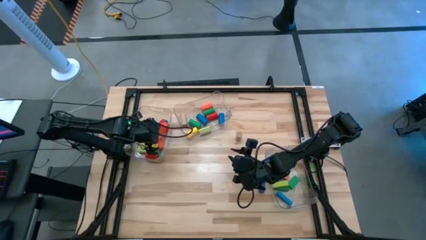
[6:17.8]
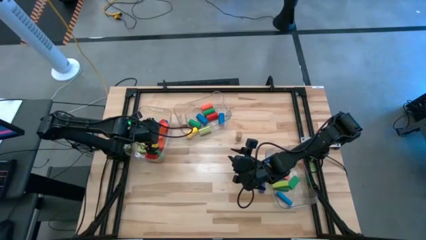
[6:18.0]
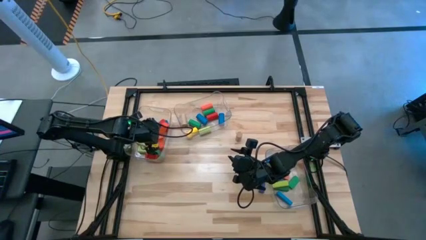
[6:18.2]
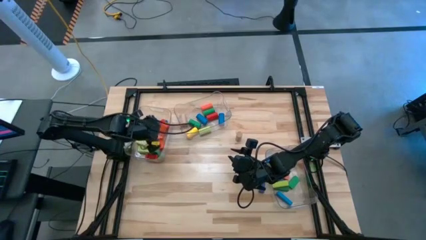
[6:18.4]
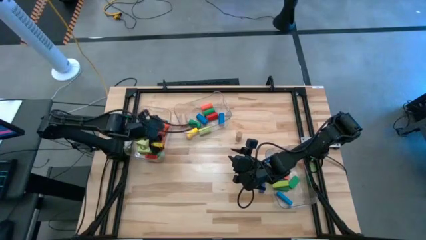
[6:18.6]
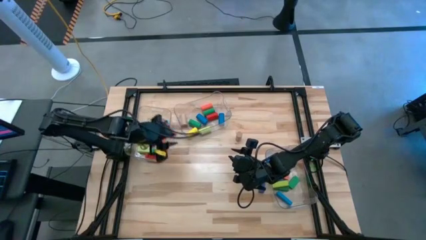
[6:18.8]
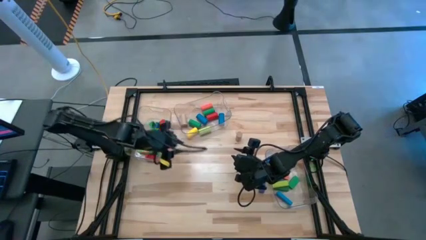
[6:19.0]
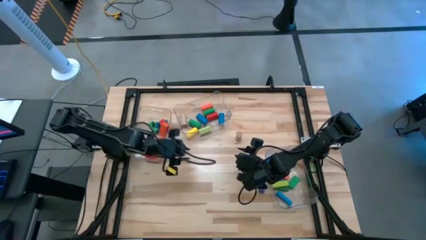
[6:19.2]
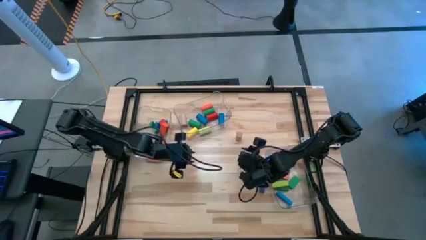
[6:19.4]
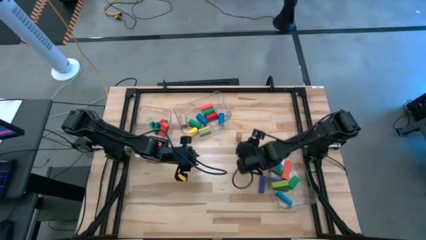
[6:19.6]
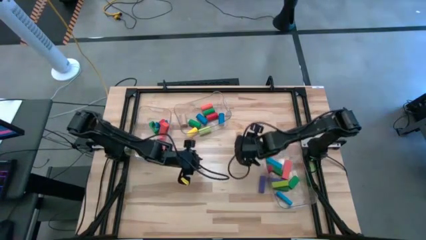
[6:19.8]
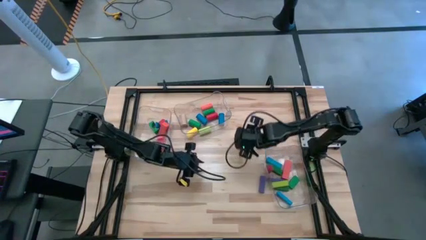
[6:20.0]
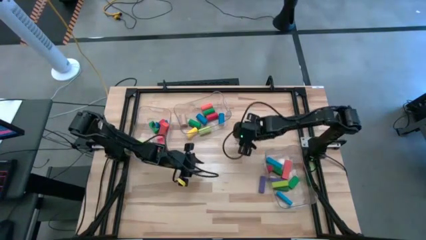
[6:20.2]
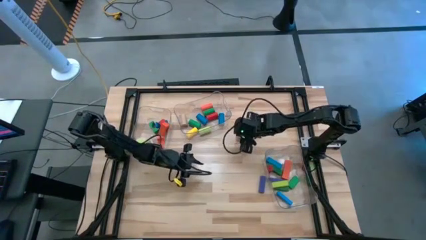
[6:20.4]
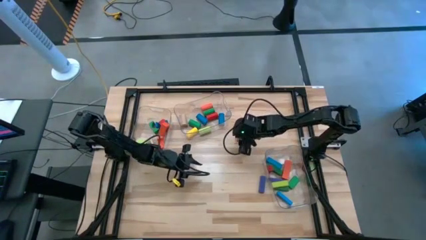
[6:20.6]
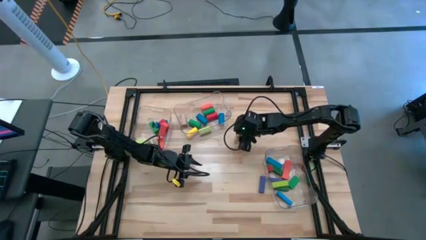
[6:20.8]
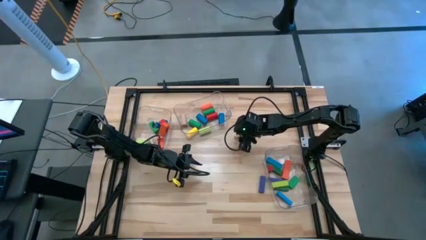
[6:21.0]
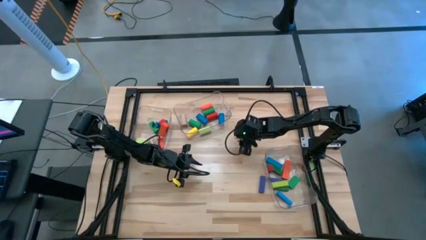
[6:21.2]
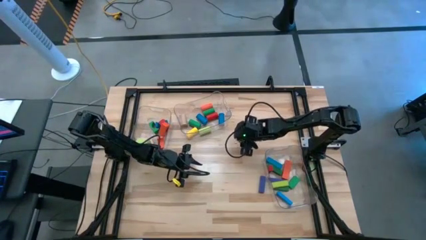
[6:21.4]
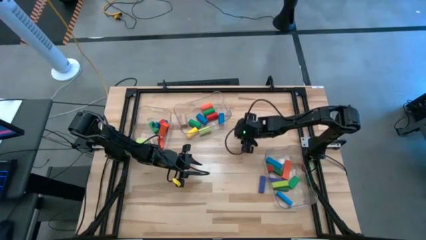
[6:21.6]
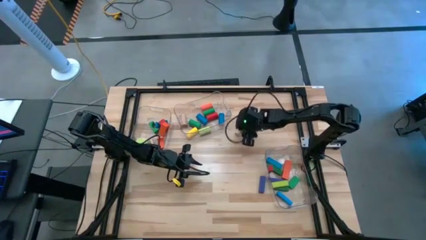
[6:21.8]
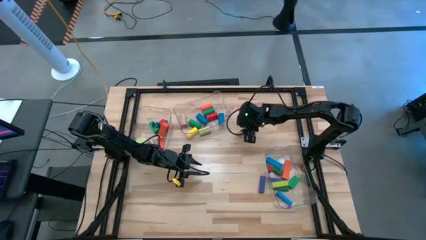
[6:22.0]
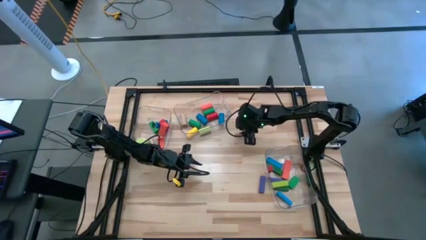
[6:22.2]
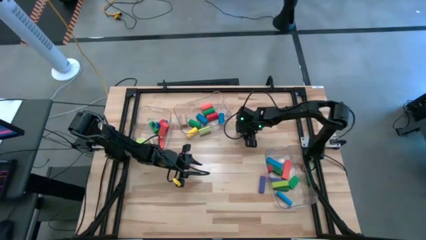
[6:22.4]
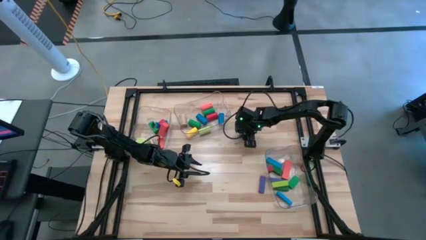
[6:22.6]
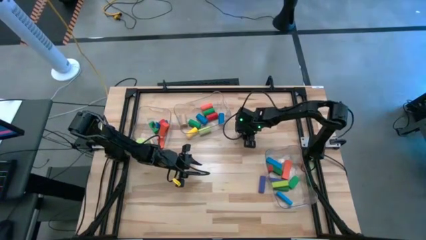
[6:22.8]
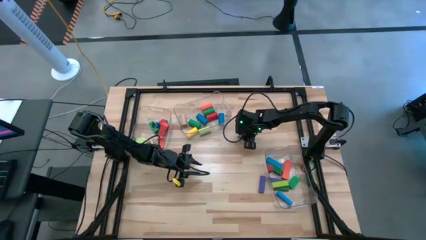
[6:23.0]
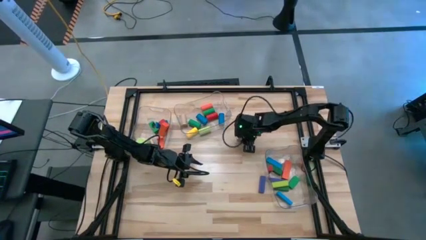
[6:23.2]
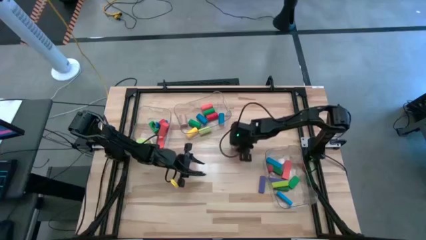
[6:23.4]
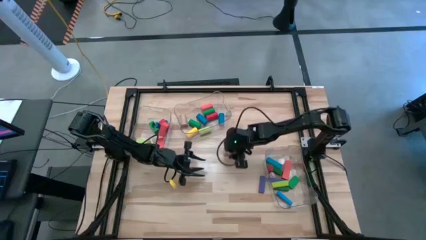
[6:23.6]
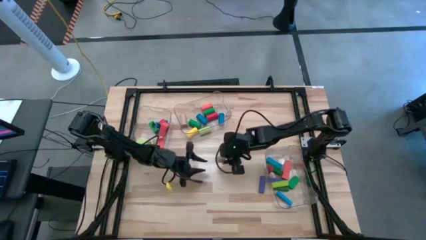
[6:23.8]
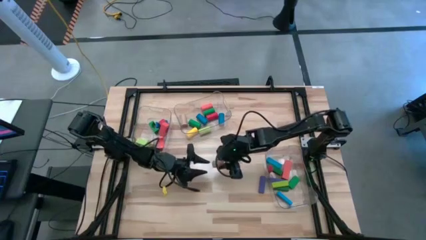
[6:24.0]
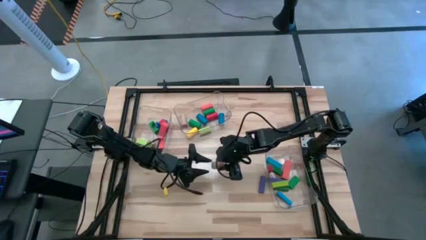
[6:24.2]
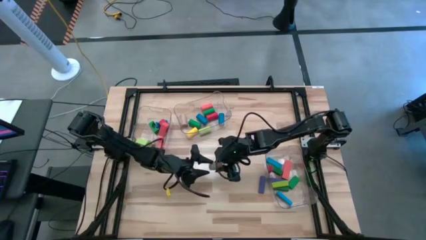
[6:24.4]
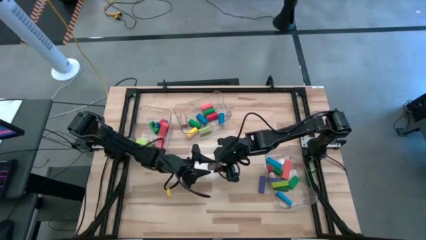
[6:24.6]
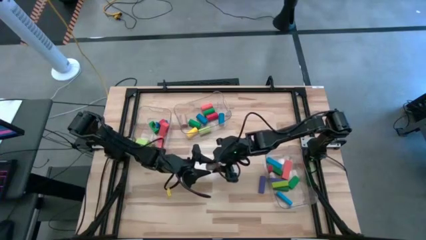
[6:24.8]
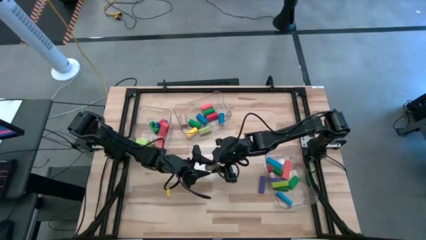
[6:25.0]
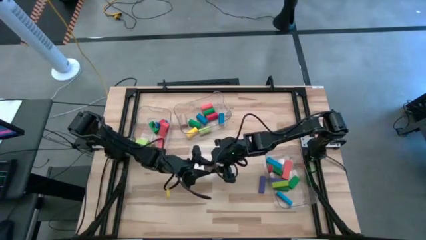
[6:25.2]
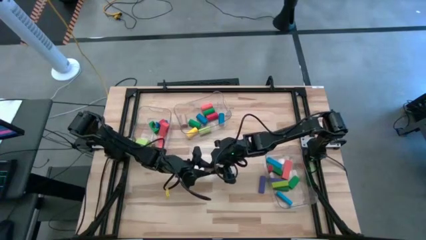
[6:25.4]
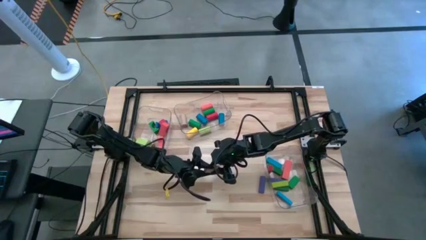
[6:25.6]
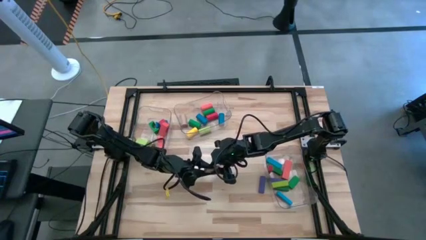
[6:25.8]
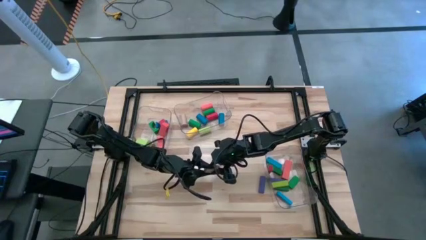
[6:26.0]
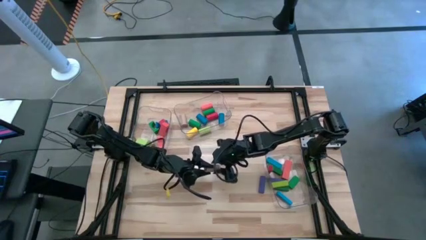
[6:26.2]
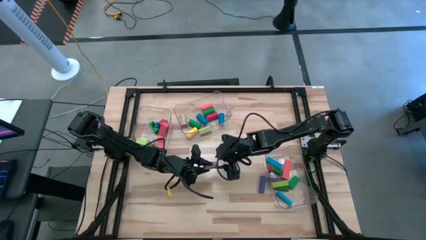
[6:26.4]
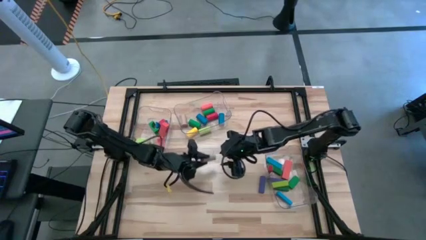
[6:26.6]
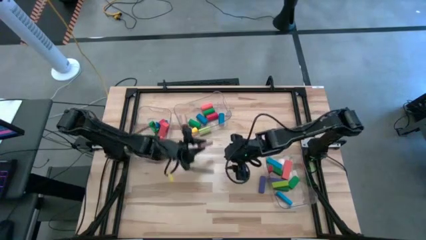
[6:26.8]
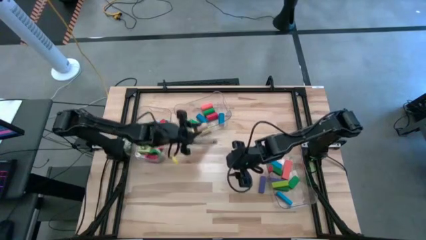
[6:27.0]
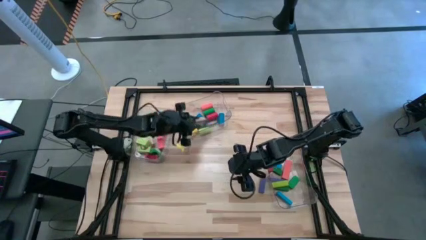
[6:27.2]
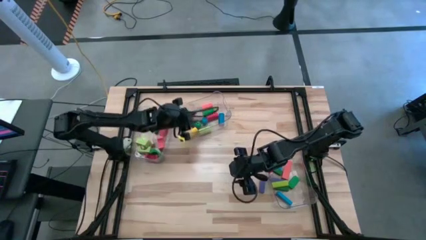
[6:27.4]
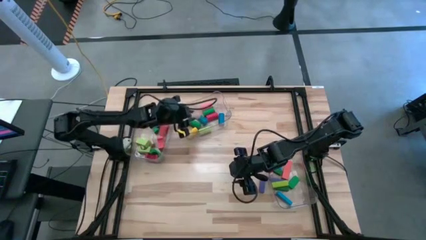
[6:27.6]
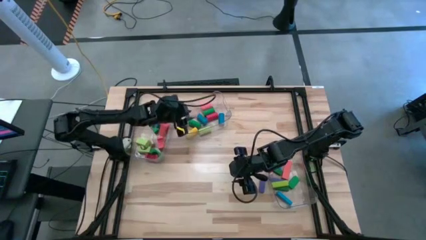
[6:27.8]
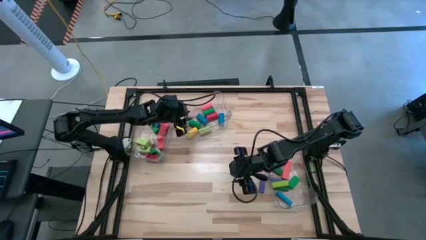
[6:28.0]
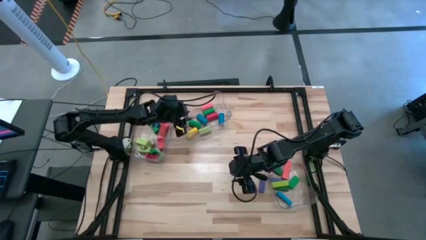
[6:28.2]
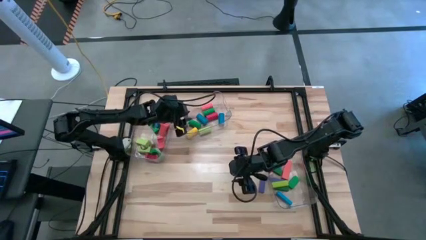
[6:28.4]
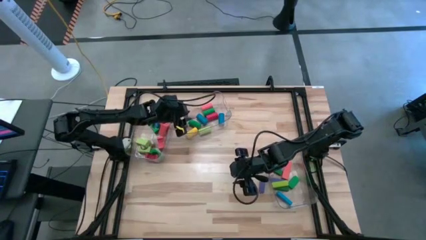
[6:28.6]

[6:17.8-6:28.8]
Task: Sort blocks by size
Put the brown cylindrical block into the top transparent bin

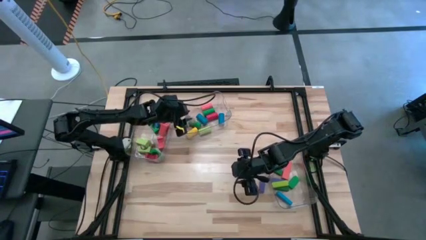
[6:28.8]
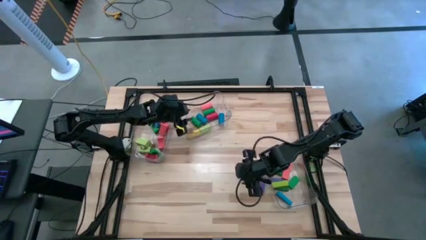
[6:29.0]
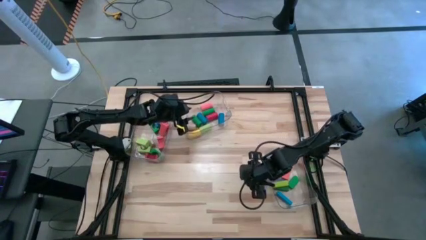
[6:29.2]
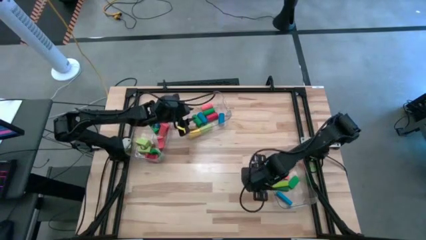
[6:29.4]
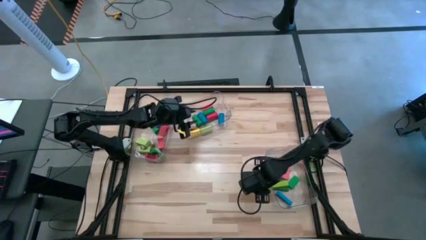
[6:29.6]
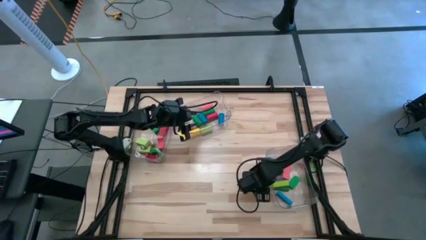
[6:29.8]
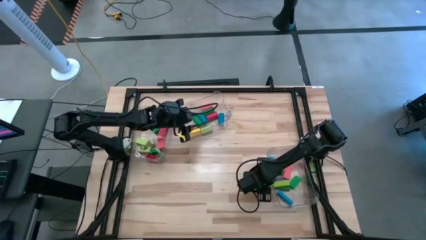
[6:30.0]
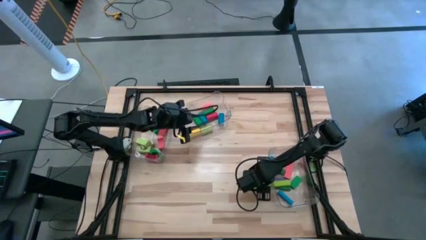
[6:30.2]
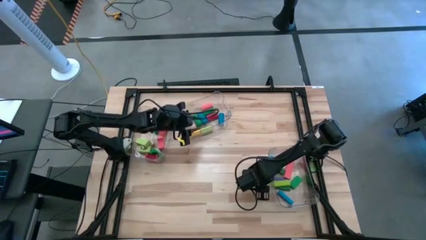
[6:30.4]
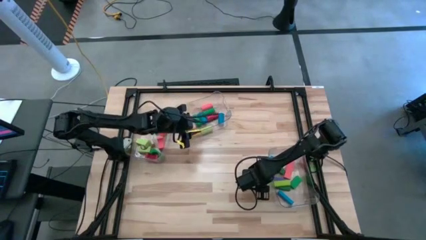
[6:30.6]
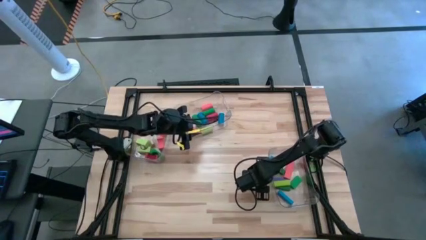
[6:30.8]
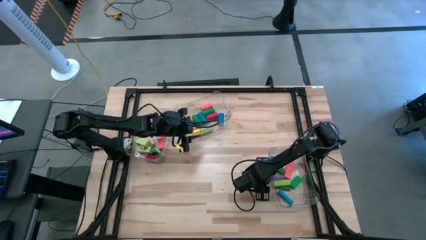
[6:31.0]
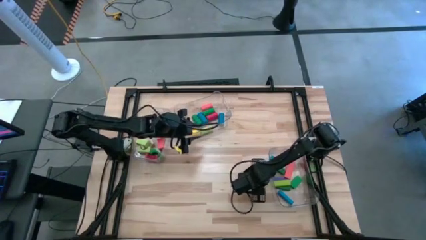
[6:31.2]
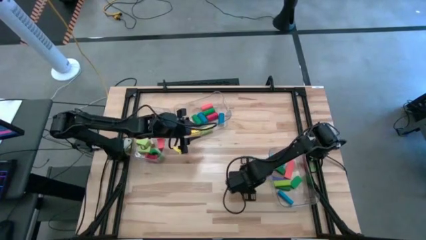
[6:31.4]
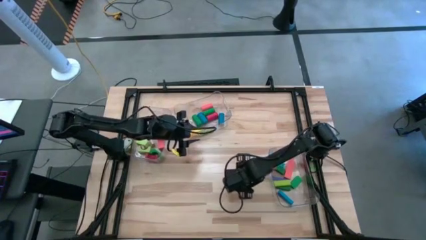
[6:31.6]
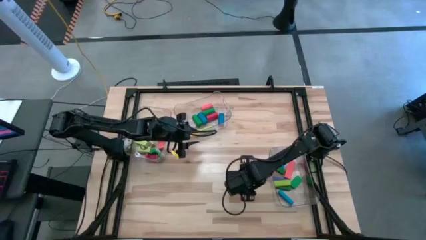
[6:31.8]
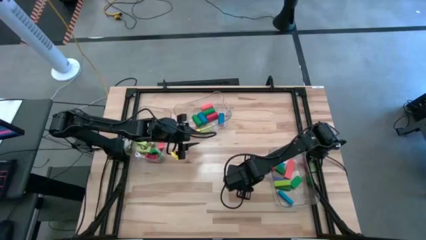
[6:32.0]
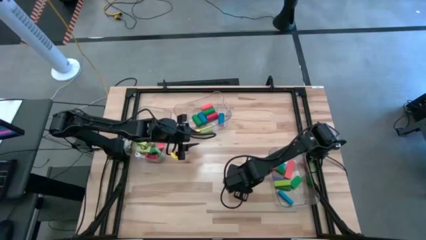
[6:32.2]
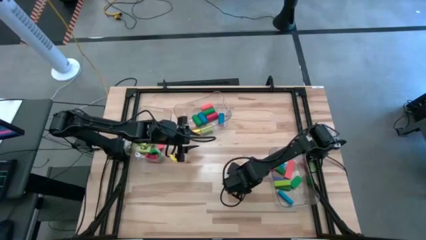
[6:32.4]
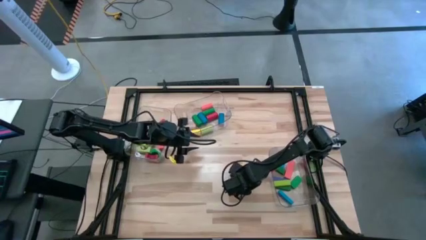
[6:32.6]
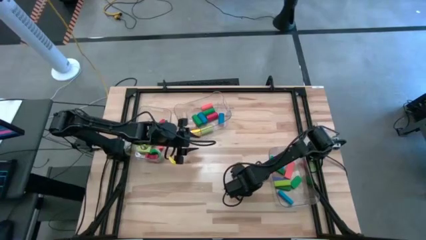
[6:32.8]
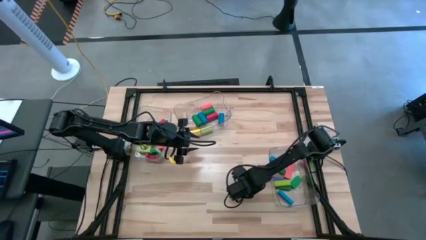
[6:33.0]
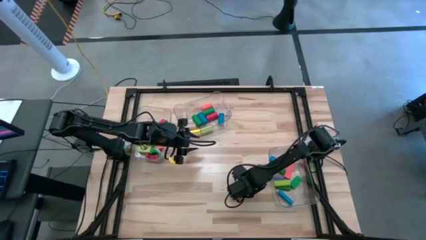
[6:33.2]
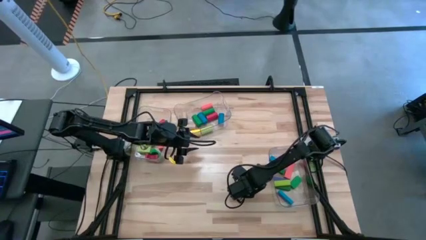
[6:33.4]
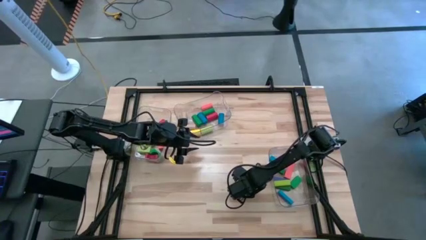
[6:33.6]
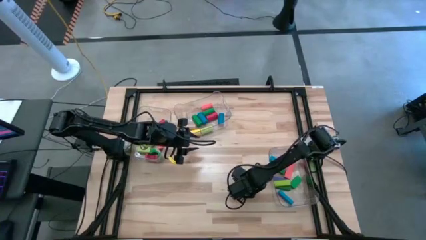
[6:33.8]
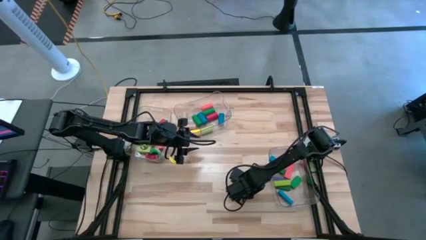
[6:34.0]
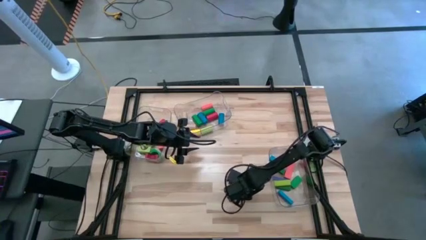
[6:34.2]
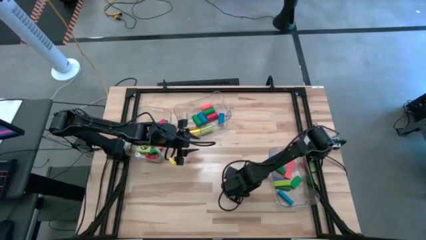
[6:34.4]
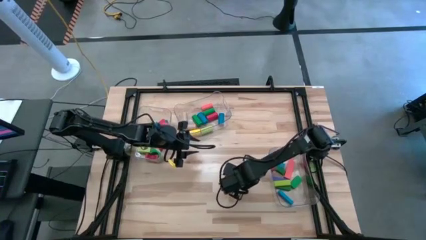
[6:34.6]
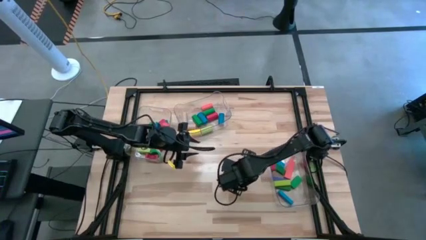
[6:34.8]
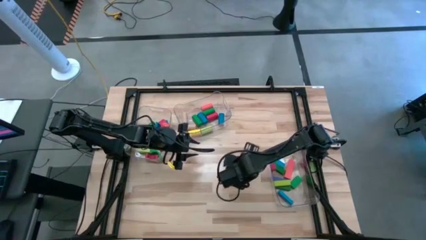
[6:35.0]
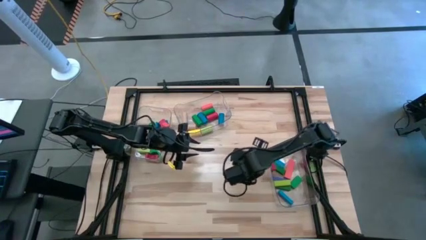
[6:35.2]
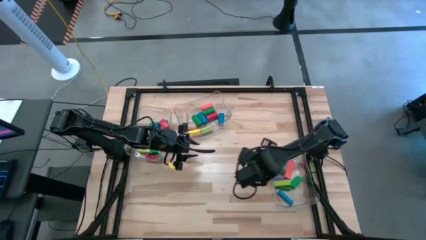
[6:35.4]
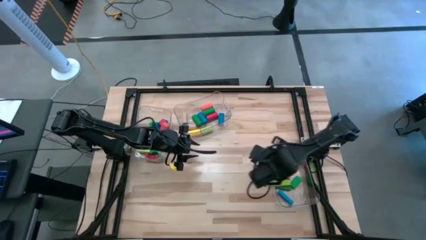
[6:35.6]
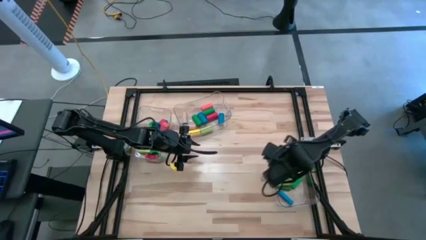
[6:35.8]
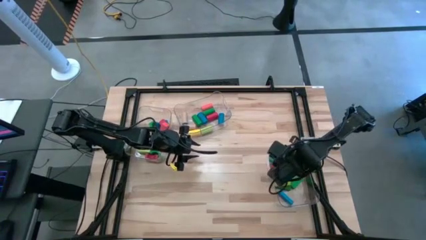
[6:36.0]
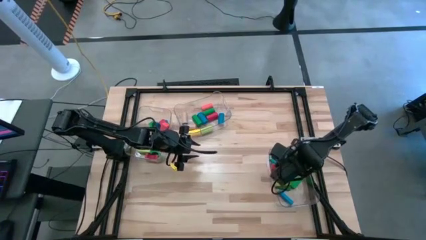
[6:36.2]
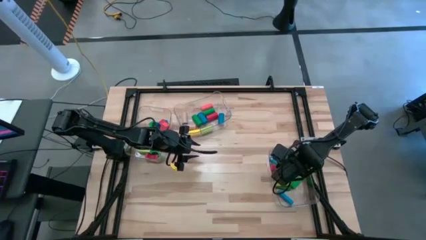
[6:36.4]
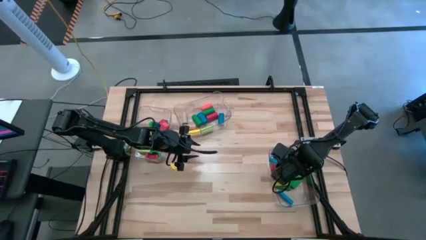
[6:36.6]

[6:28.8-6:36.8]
Put the purple rectangular block into the right transparent bin
